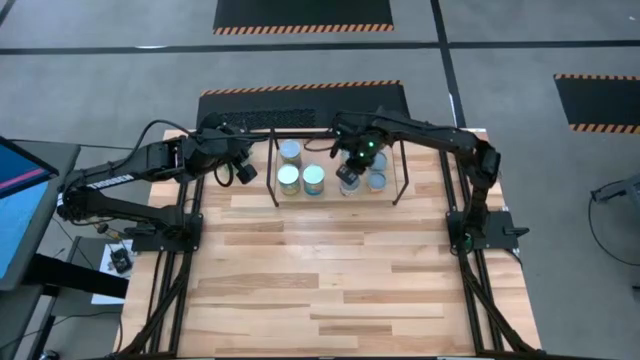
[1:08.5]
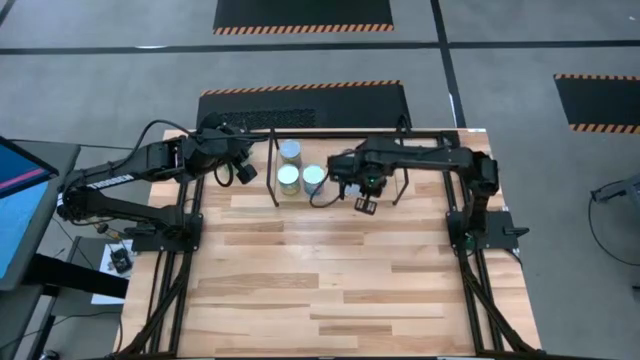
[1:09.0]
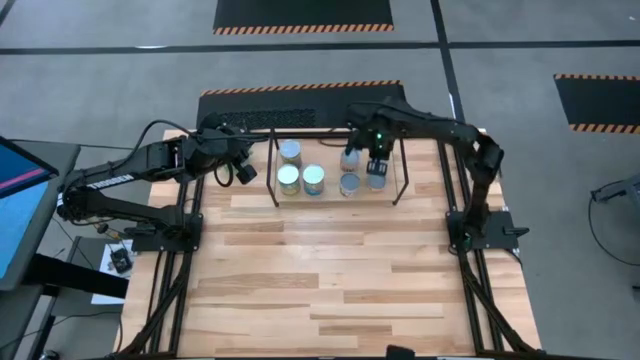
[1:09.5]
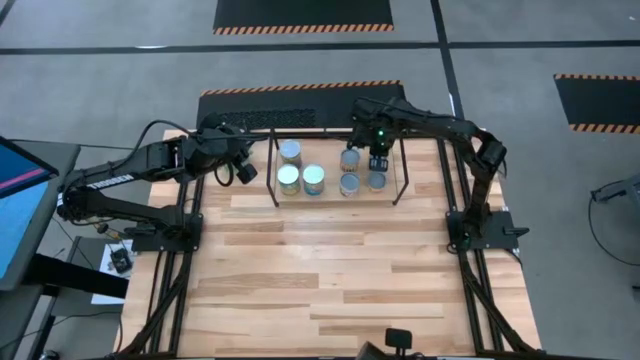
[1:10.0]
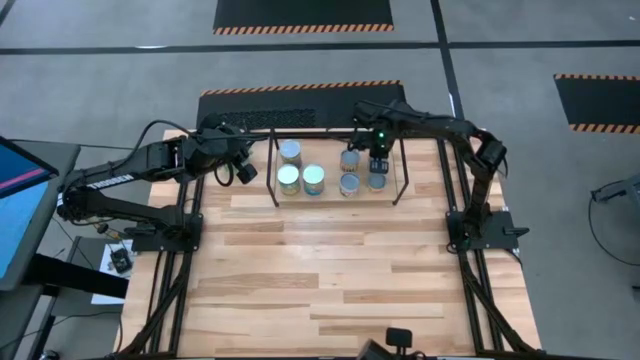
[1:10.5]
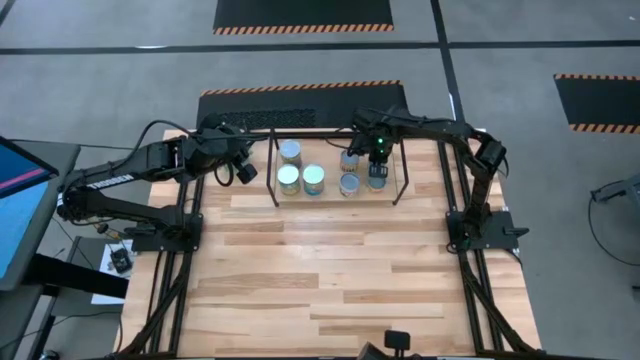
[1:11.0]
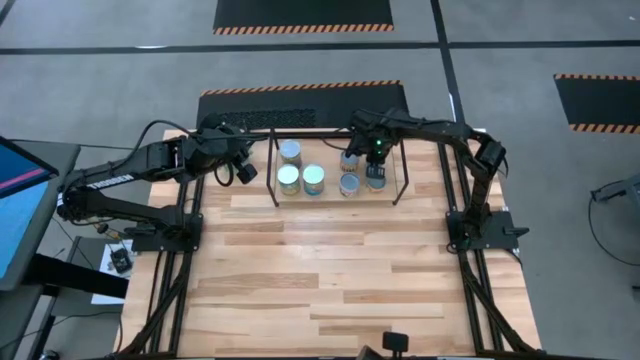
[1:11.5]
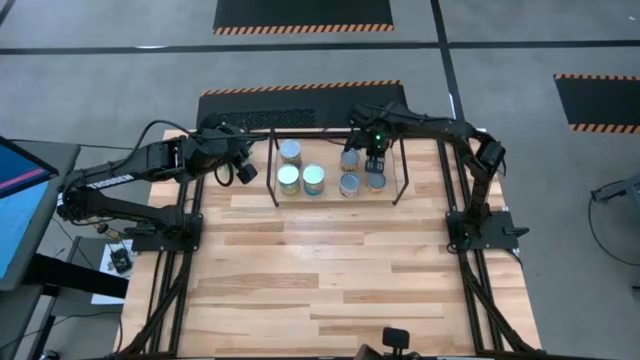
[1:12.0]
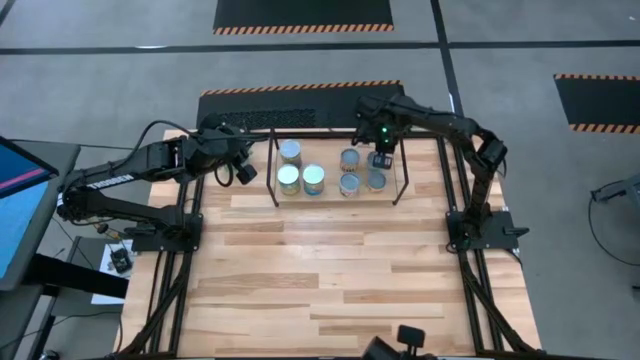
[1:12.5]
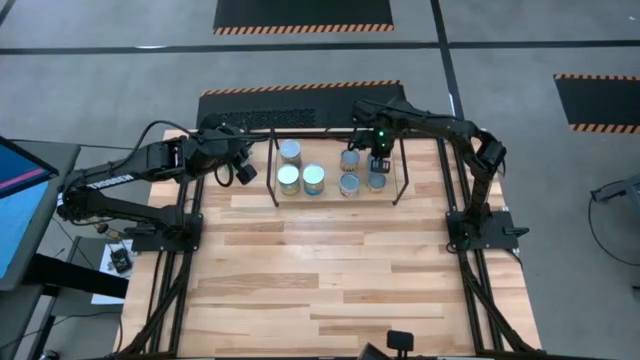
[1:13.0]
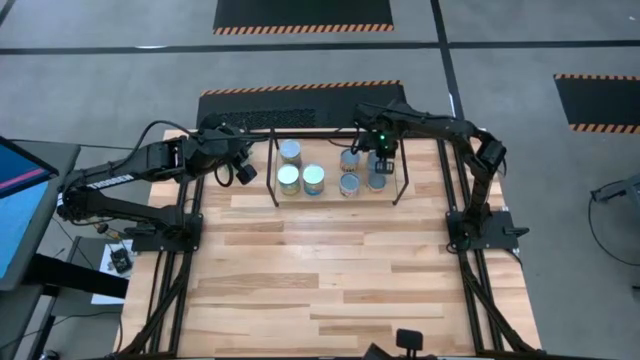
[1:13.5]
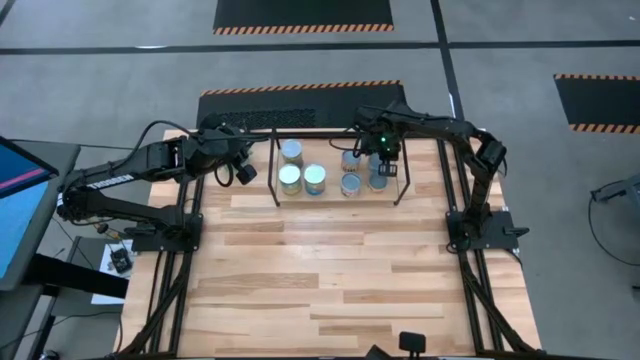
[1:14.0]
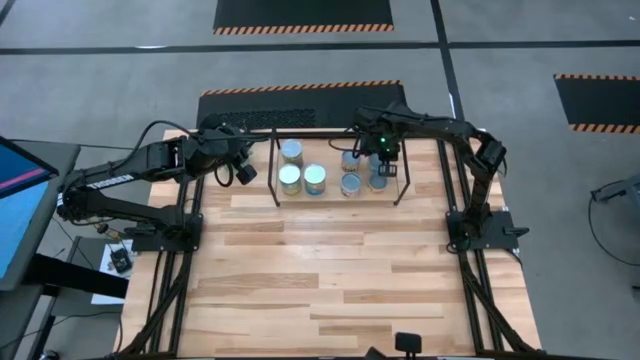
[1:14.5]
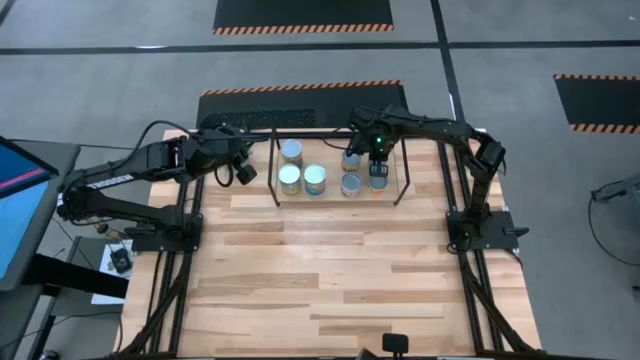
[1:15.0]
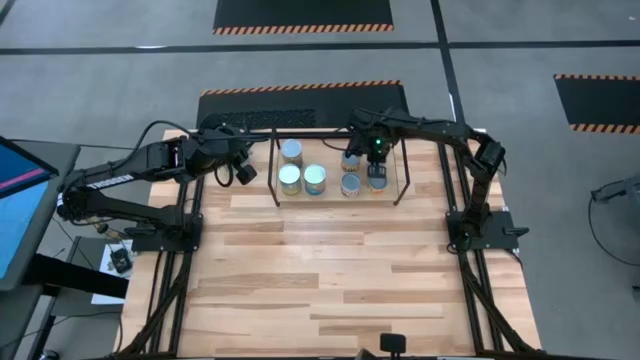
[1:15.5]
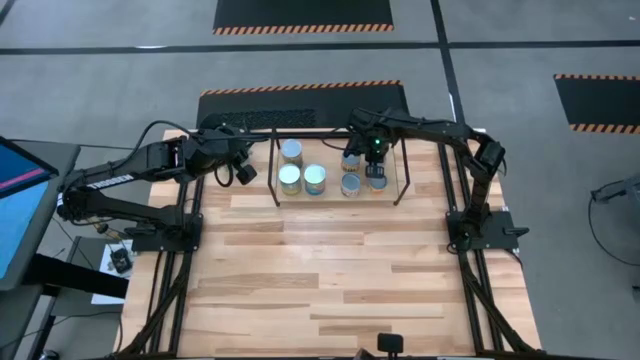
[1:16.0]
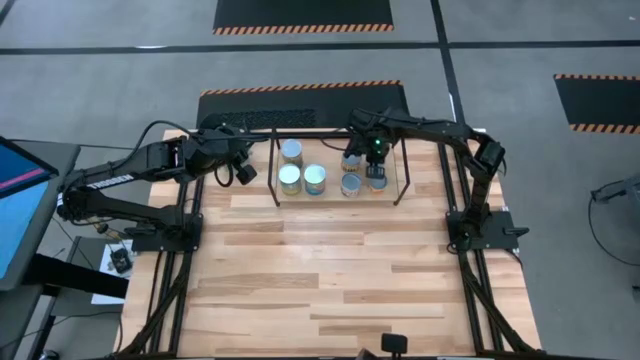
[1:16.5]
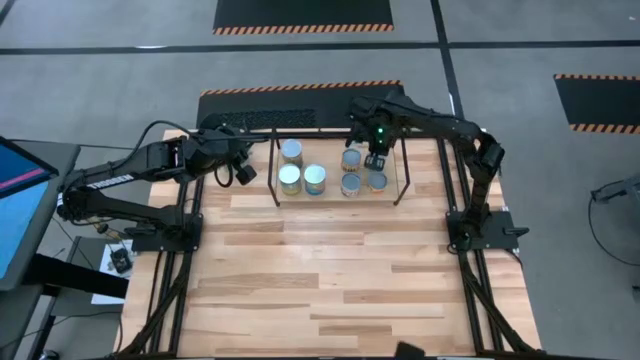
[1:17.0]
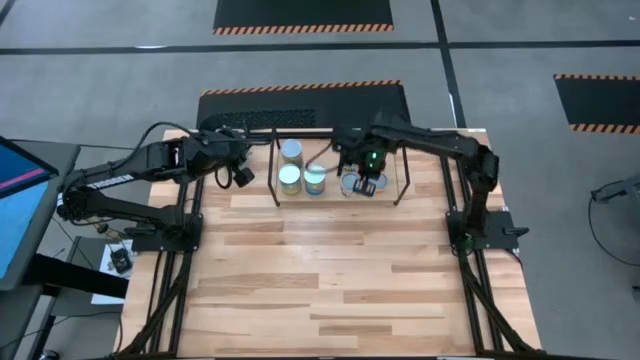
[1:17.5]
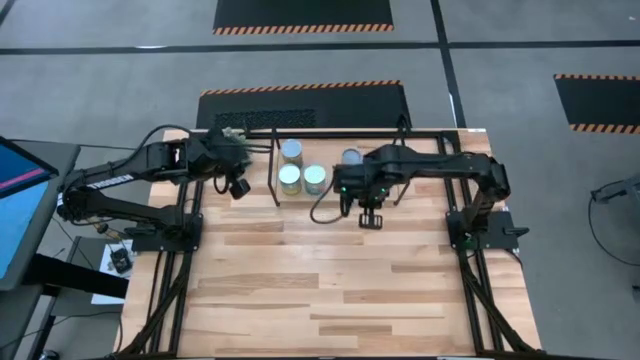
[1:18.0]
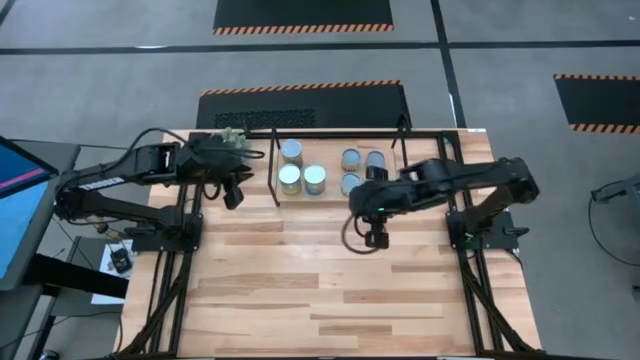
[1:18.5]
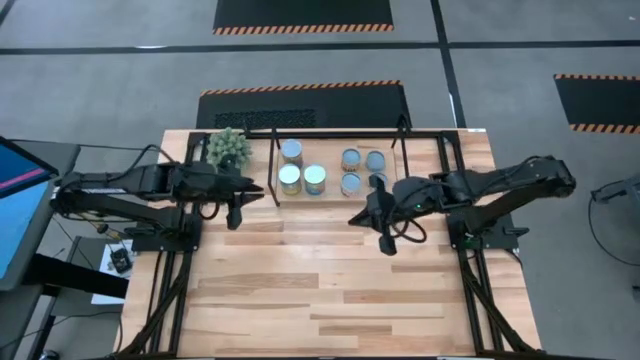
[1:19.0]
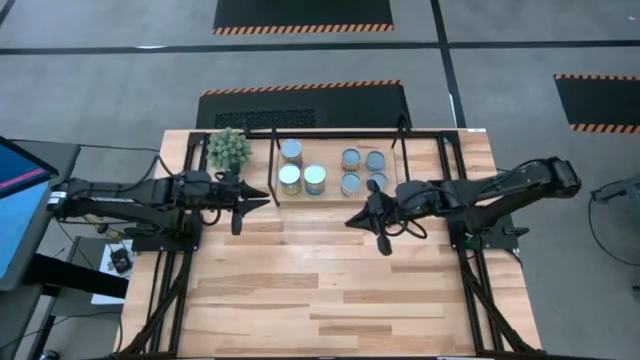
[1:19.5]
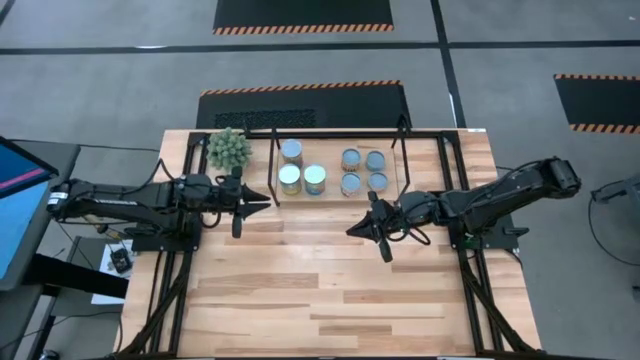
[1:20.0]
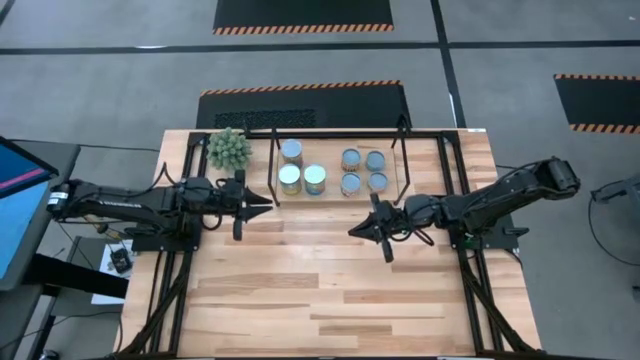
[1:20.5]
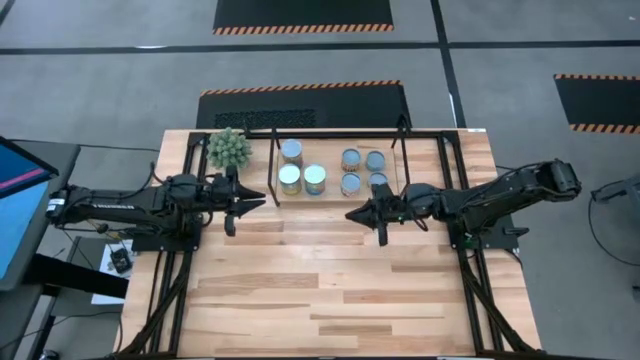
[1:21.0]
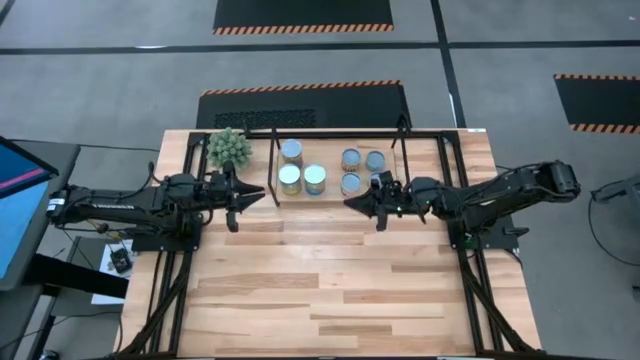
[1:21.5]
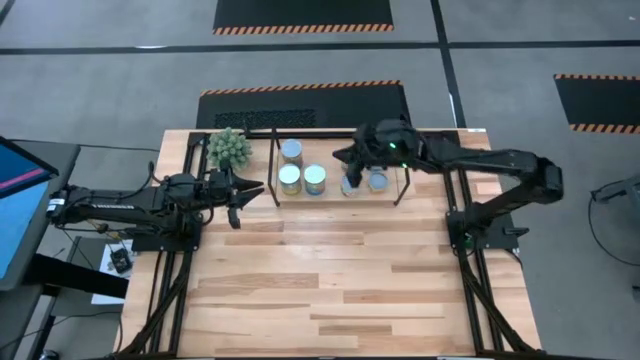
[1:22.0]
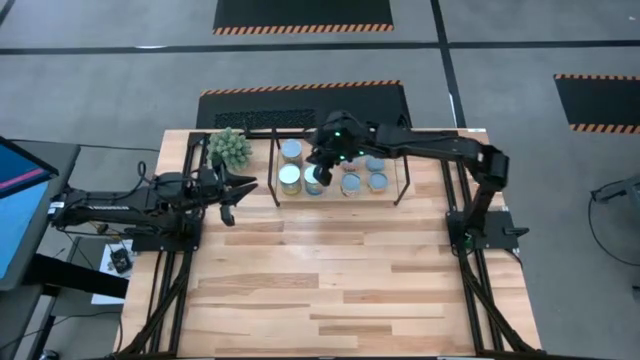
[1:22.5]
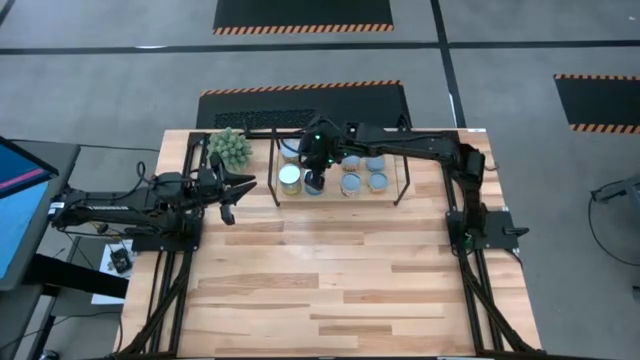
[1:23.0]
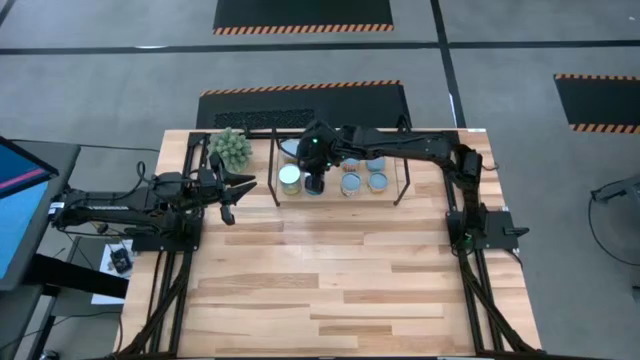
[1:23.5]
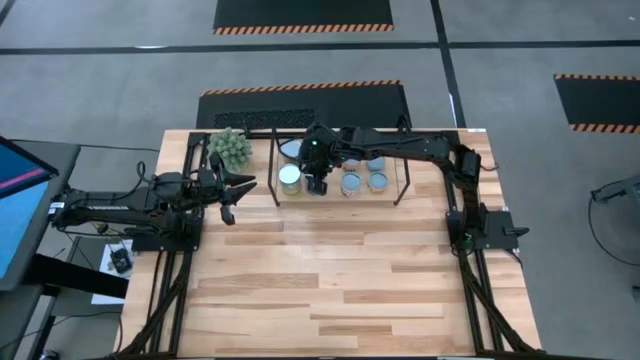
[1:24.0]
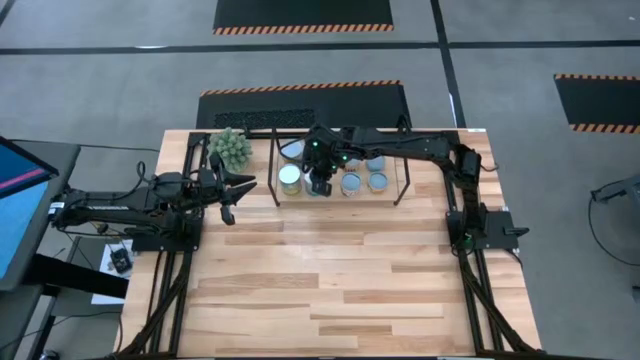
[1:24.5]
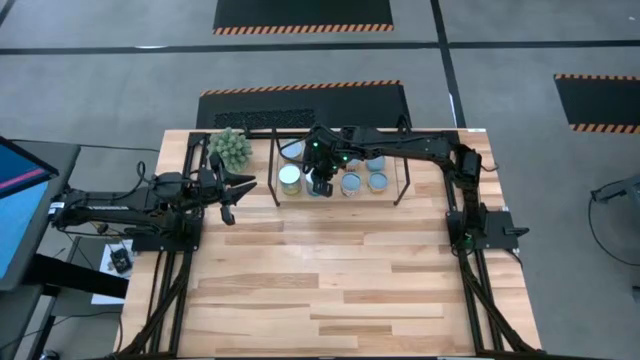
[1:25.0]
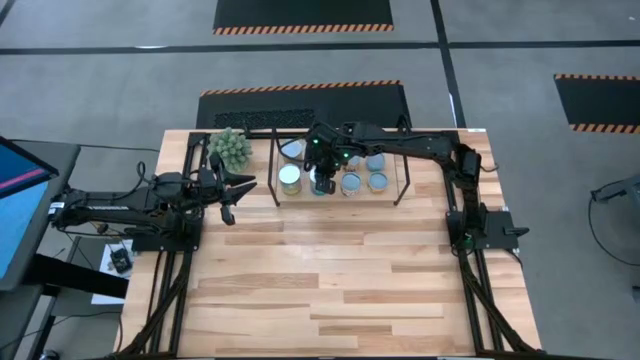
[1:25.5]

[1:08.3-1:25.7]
Task: Pick and place cans onto a shelf
Adjust the canned goods on the shelf

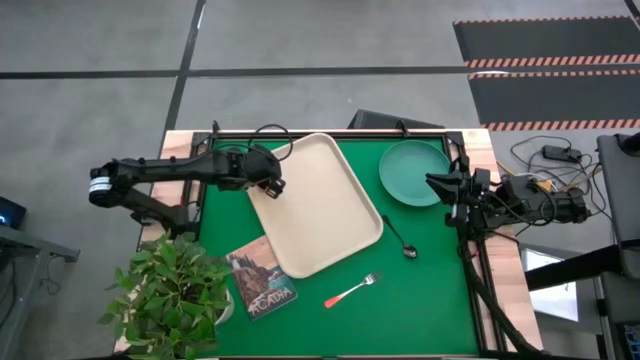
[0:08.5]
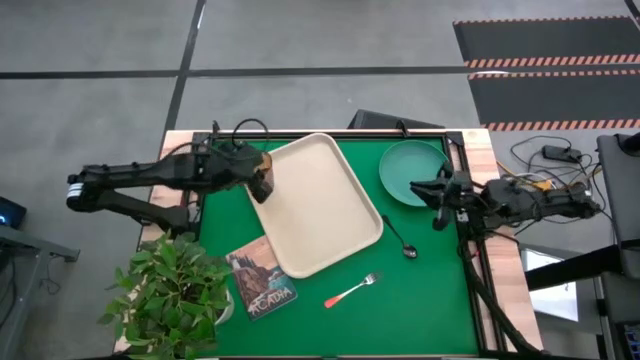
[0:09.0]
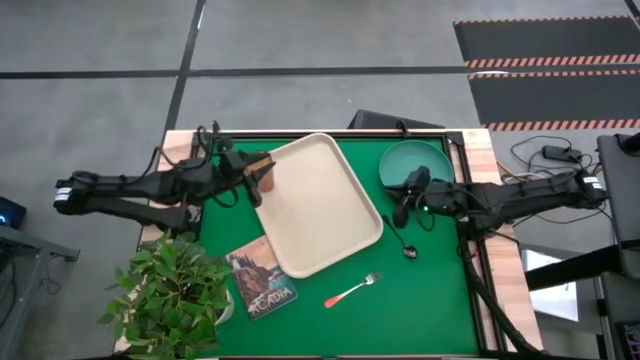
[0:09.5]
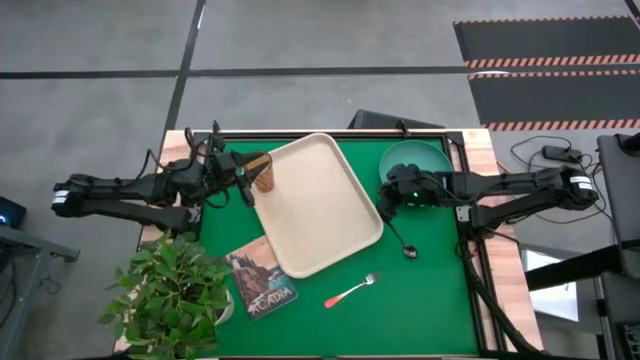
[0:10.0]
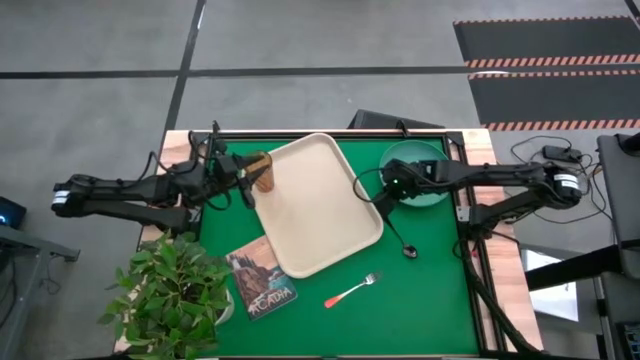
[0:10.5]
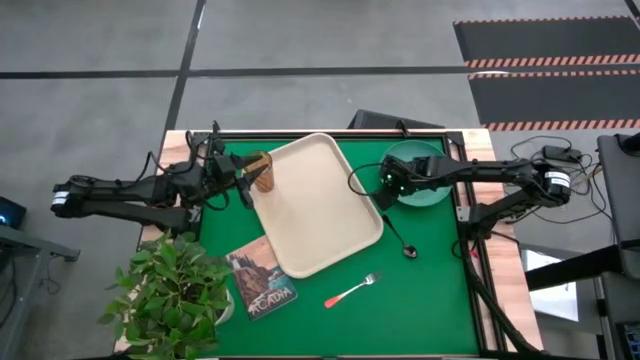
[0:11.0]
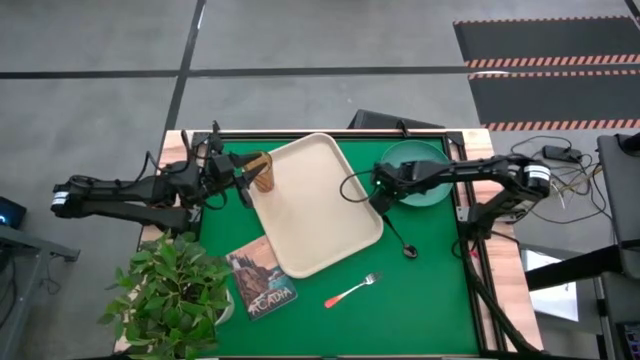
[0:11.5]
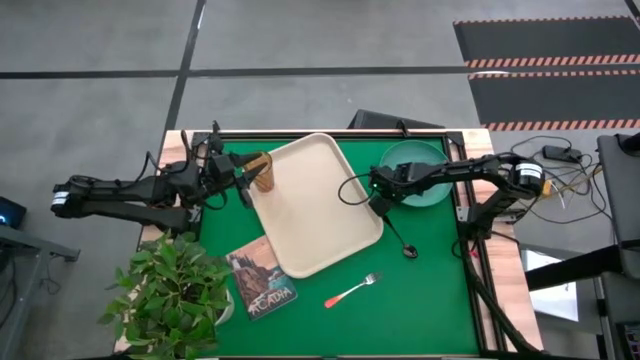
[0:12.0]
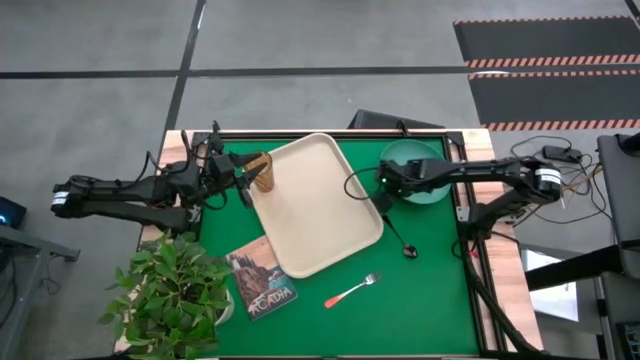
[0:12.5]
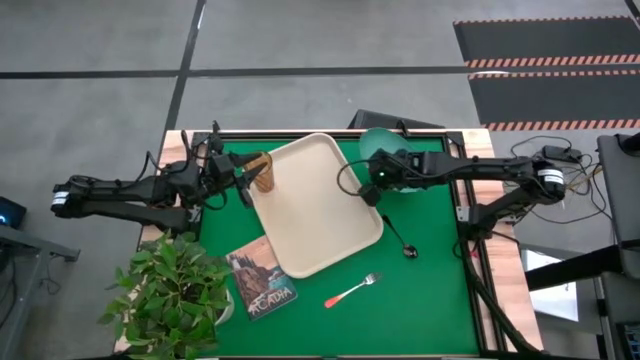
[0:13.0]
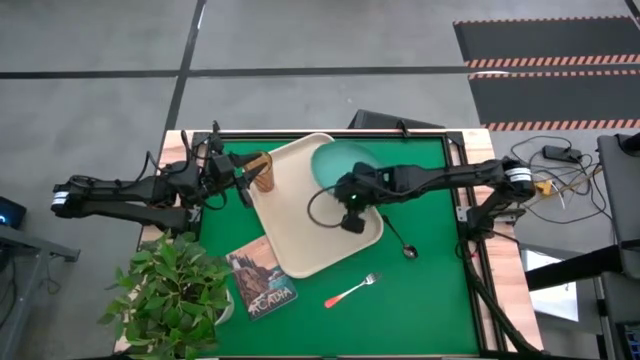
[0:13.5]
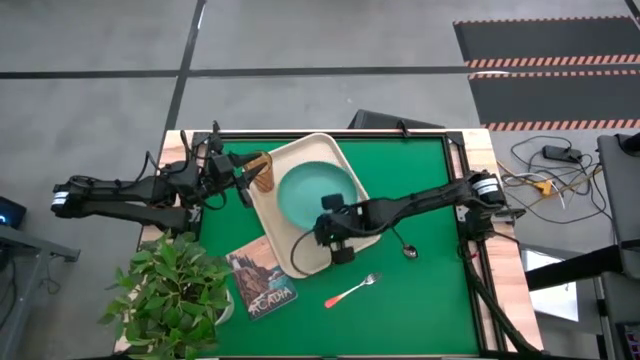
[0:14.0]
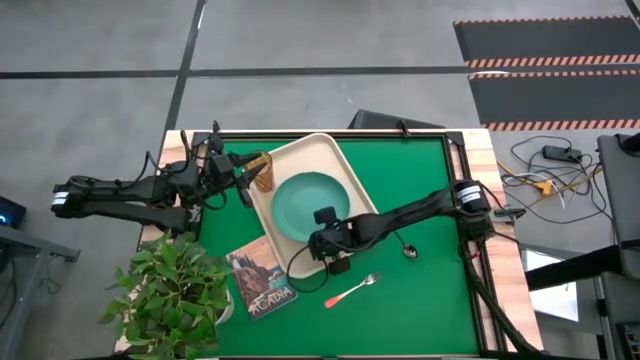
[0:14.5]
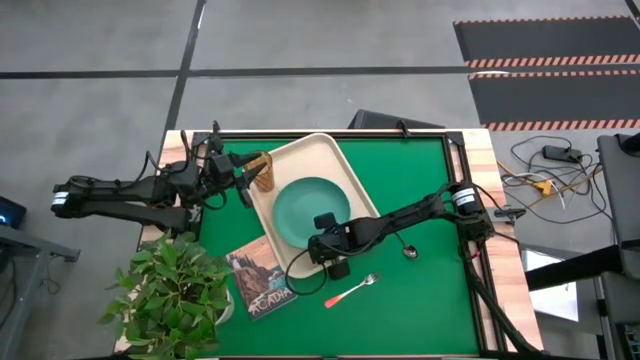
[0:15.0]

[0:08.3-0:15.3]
Task: Pick and place plate/cup/fork/spoon on tray
Put the green plate on the white serving tray
